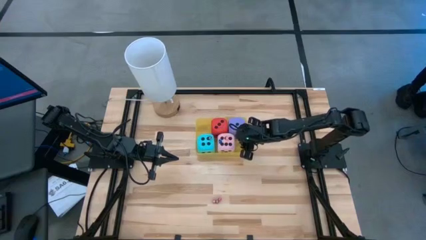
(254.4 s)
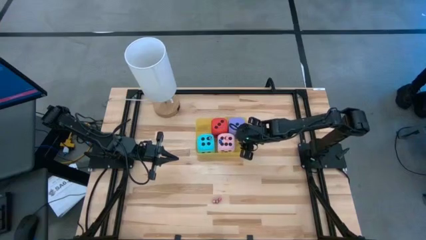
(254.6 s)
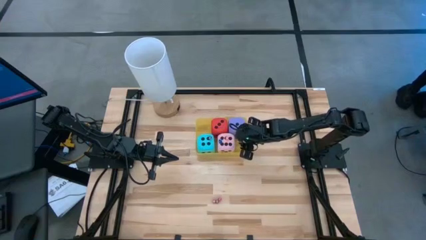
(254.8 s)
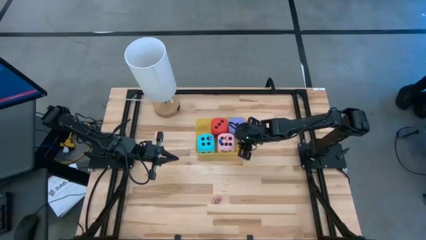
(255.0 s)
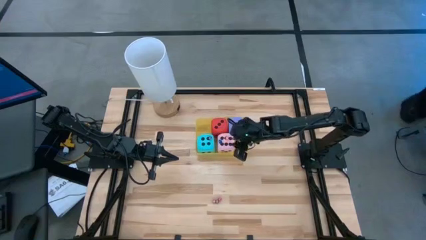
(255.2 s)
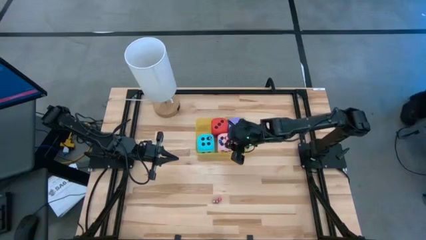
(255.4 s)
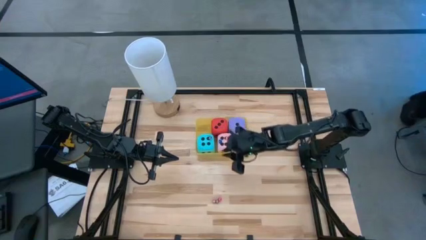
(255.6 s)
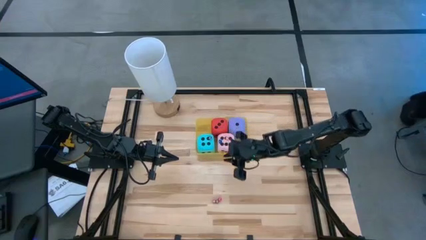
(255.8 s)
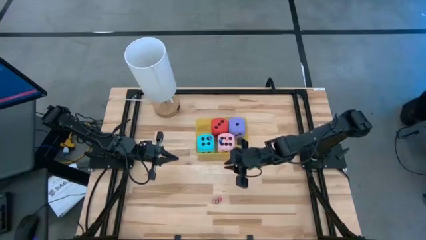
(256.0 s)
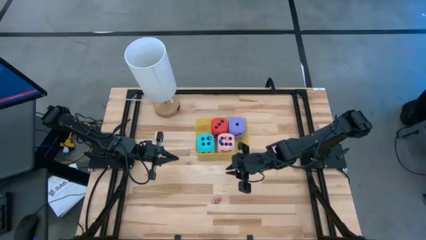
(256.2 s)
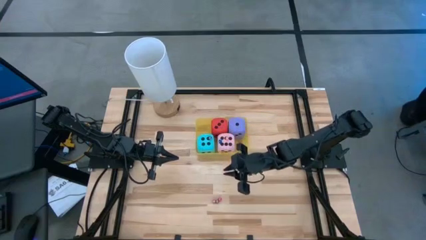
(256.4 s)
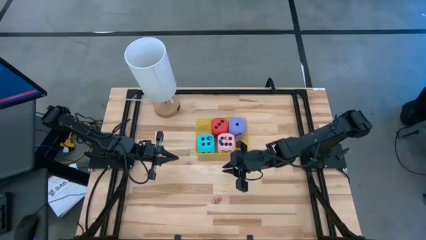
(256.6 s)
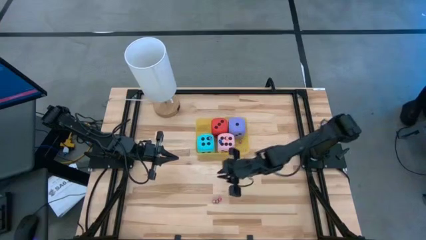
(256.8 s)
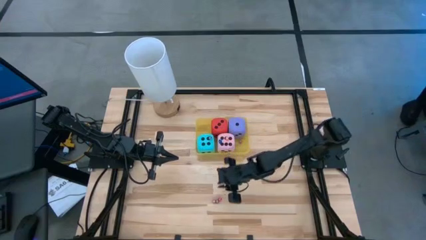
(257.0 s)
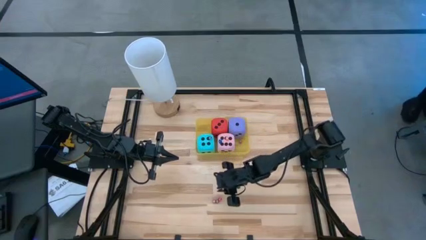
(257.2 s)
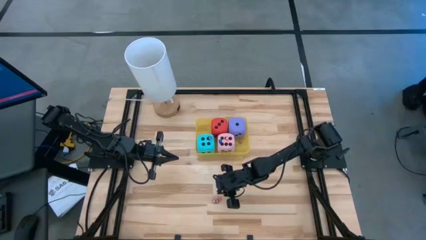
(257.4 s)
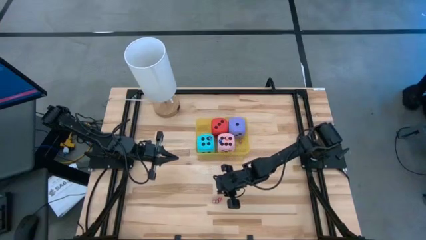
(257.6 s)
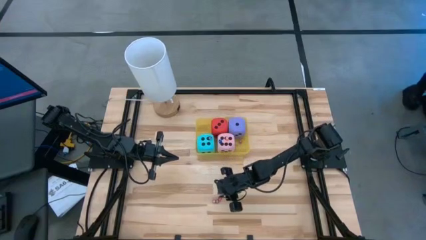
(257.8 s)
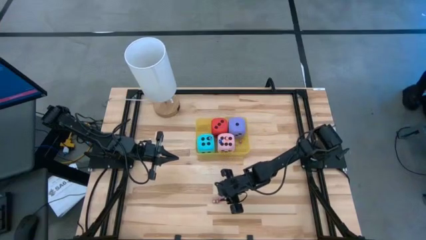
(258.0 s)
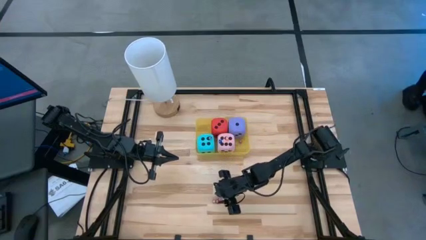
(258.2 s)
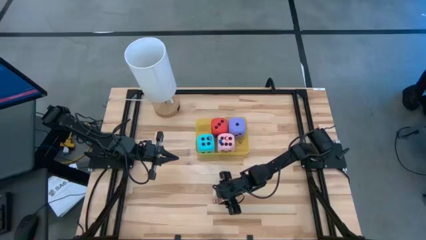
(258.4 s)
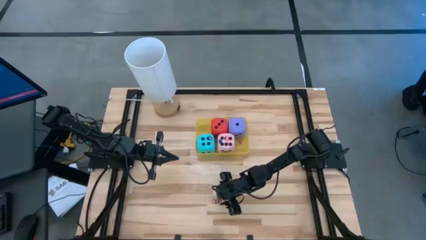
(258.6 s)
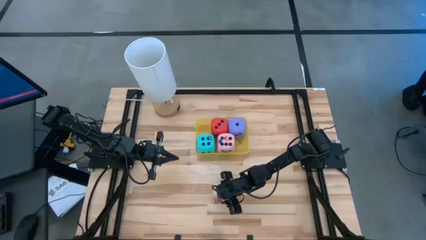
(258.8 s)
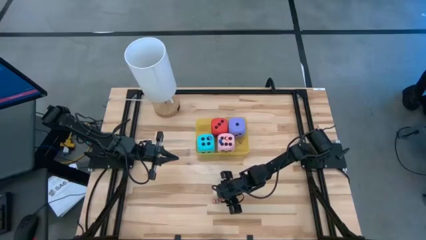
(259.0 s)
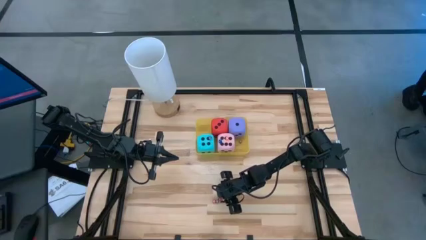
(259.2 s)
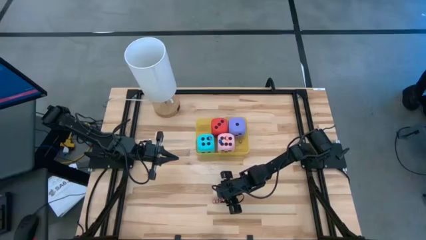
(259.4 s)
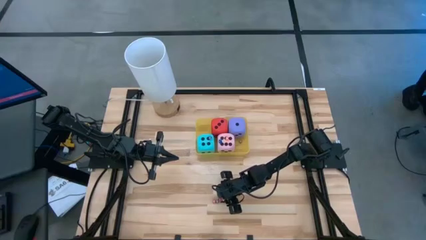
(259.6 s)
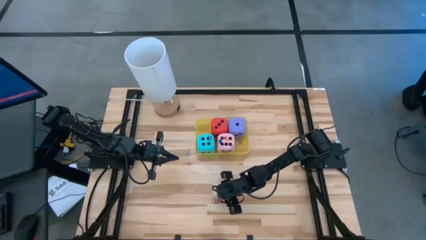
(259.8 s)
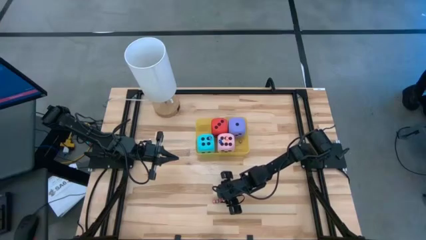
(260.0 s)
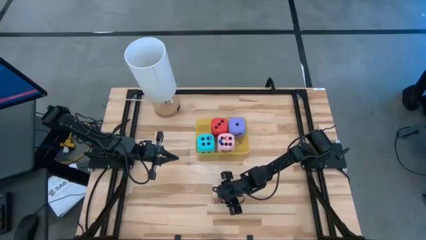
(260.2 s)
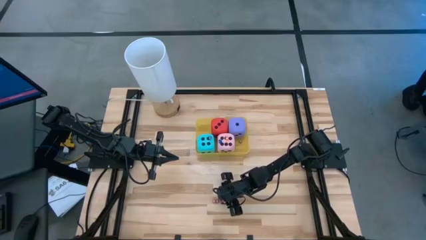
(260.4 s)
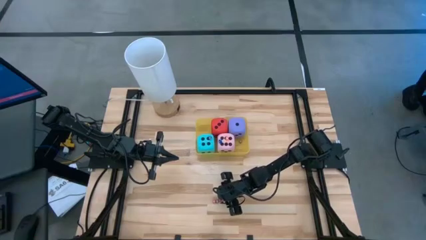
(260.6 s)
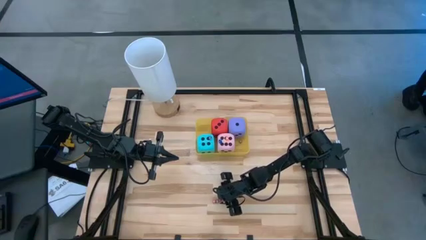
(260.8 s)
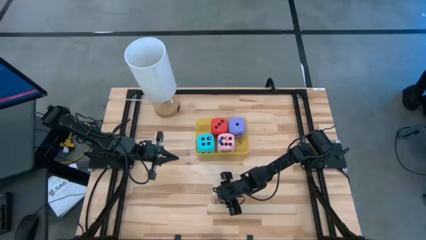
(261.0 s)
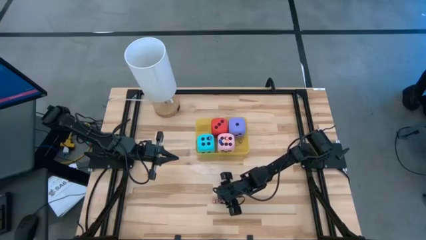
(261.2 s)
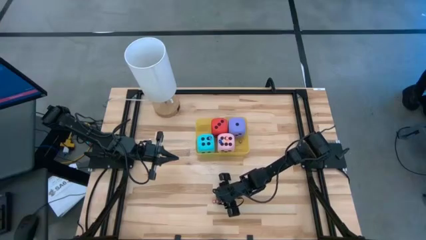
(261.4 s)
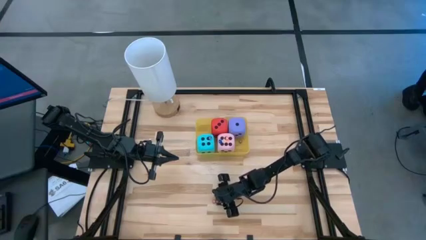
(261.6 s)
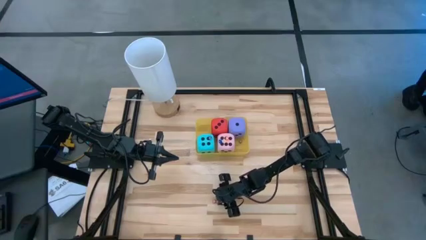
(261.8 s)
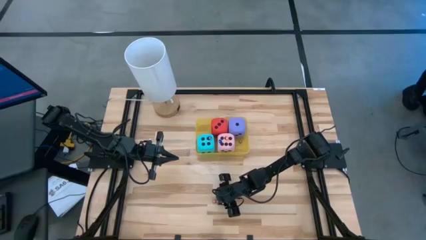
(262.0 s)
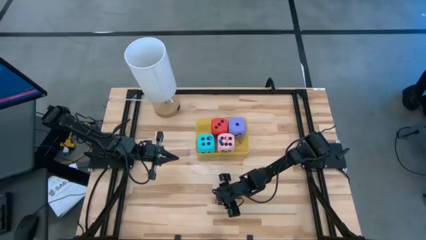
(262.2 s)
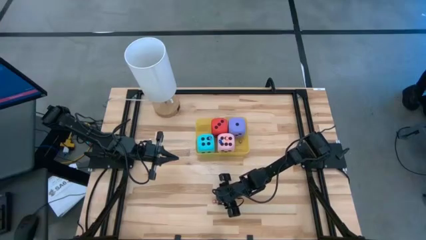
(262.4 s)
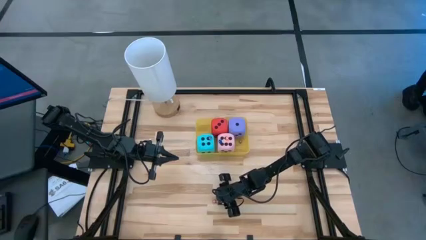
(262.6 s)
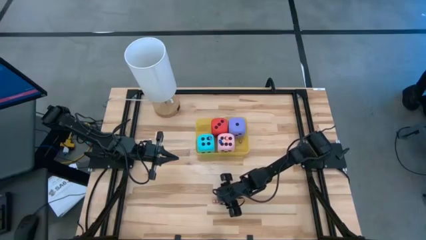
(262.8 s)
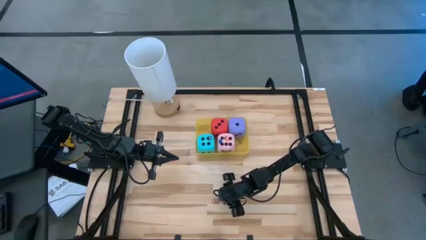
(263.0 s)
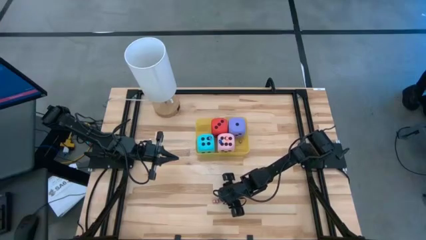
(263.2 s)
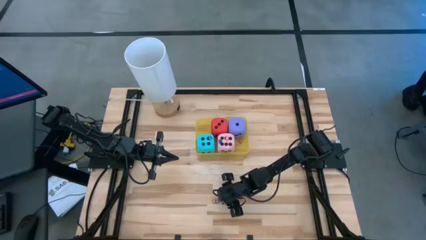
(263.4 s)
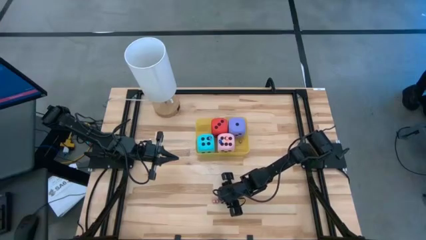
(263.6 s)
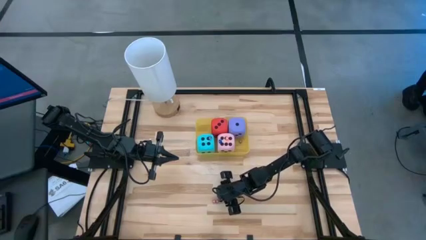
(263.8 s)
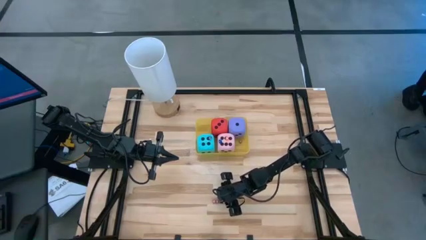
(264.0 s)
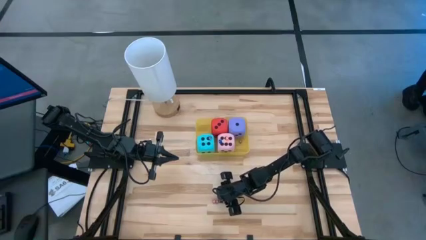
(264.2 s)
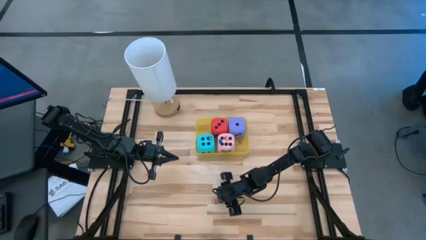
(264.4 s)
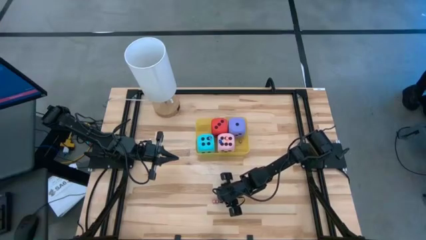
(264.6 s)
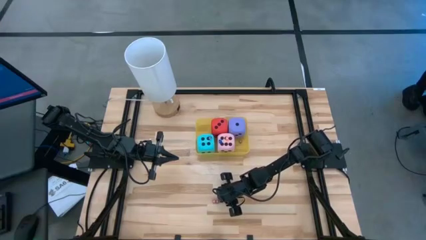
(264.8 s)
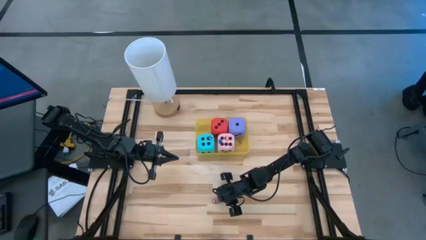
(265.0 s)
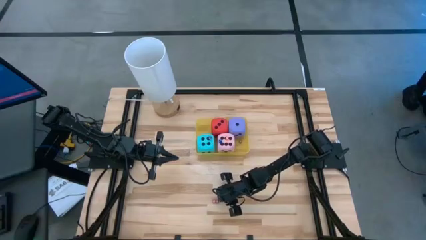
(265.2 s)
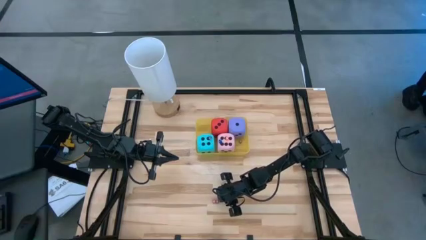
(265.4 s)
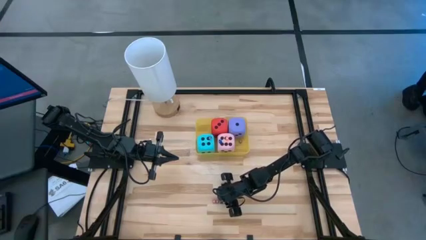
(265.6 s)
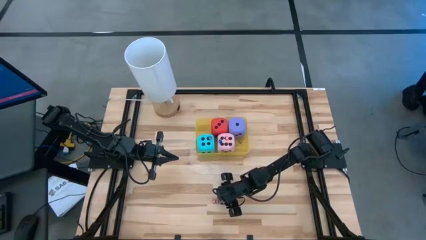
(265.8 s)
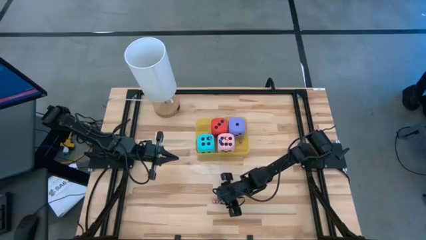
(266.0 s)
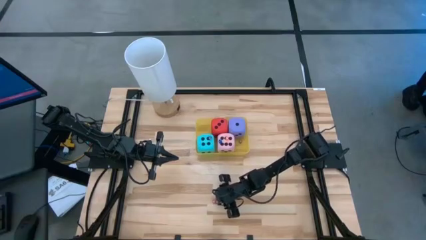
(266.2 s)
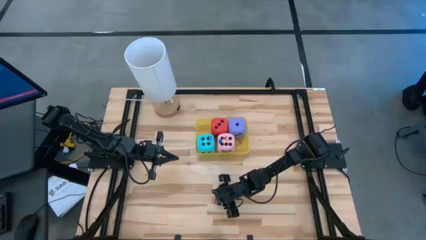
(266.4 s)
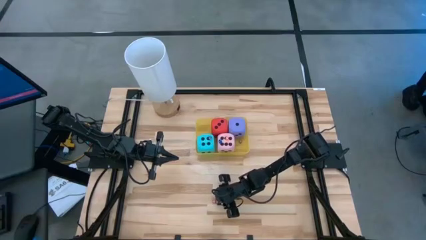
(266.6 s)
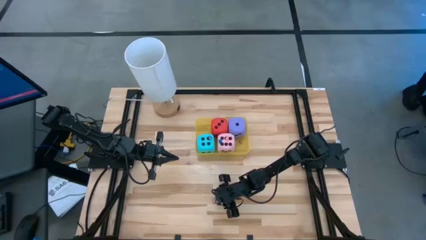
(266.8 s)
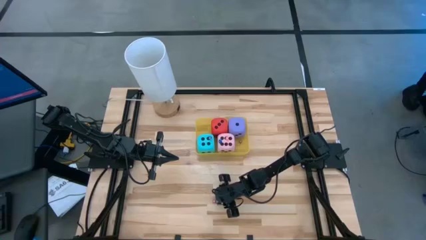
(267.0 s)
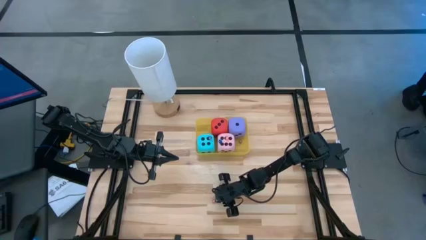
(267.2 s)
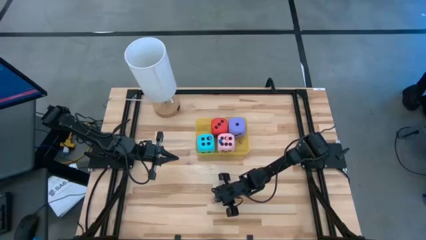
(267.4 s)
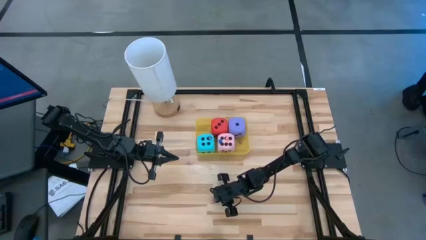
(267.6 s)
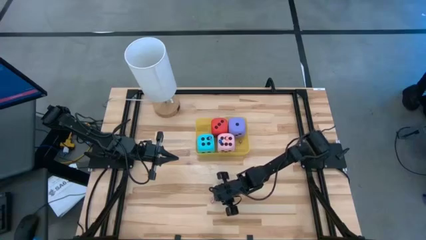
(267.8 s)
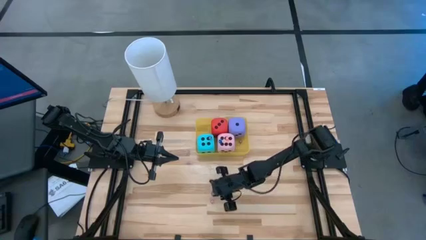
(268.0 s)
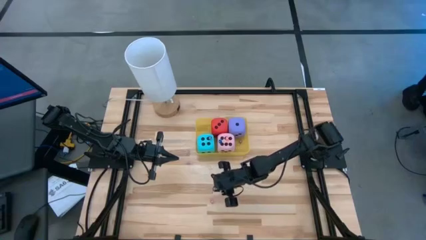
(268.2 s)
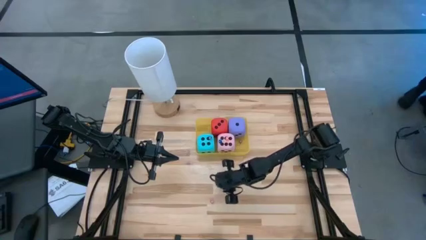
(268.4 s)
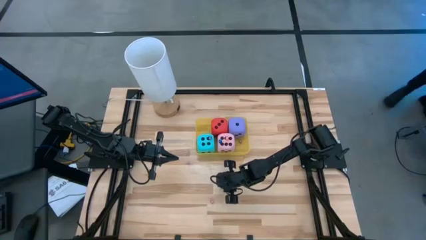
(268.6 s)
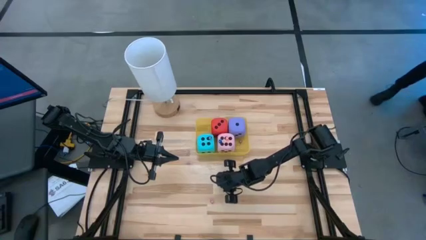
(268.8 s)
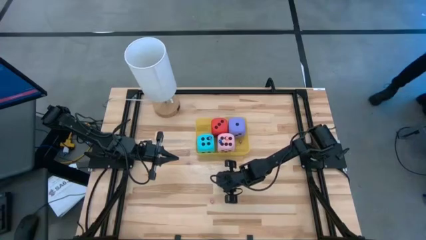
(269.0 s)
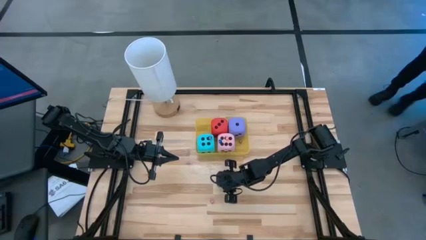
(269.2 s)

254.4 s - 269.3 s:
Task: Pick & Place Dice
Put the right small pink dice into the yellow bin
